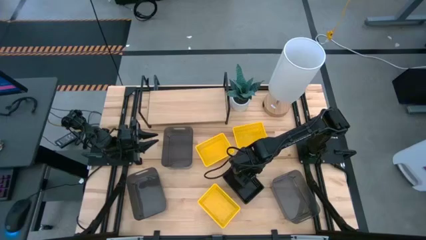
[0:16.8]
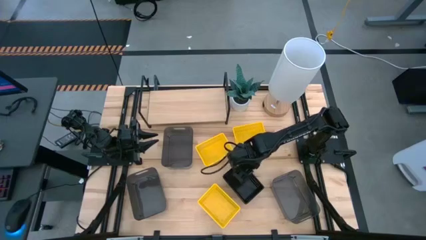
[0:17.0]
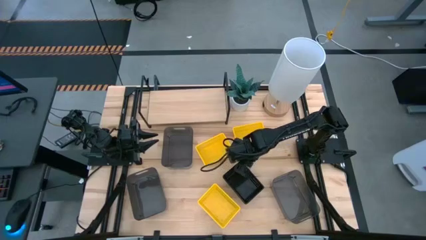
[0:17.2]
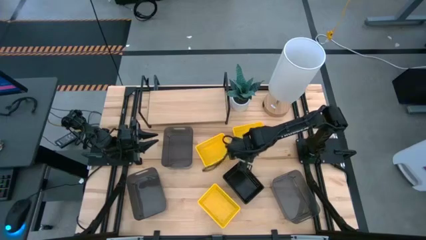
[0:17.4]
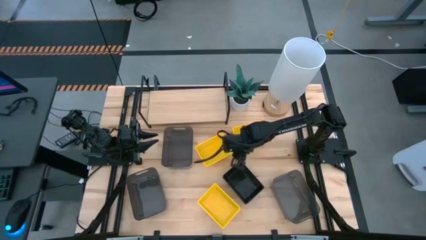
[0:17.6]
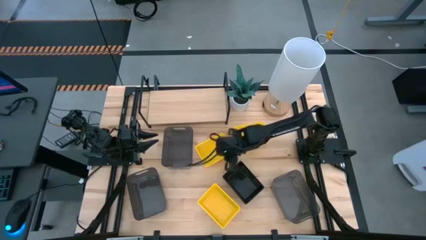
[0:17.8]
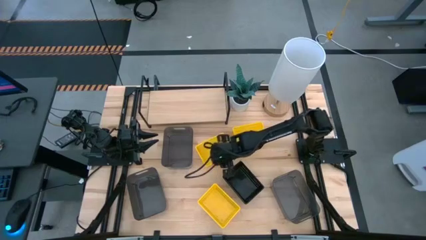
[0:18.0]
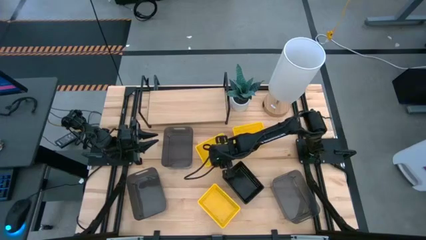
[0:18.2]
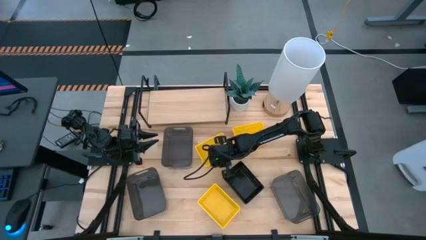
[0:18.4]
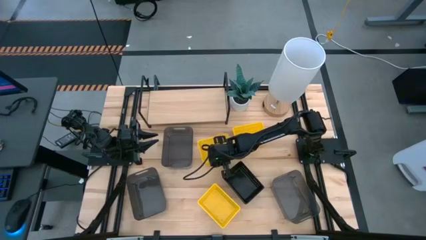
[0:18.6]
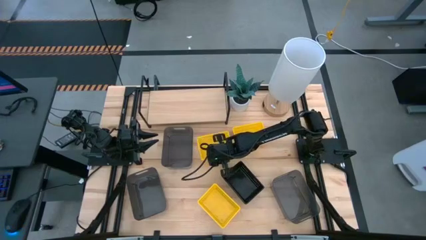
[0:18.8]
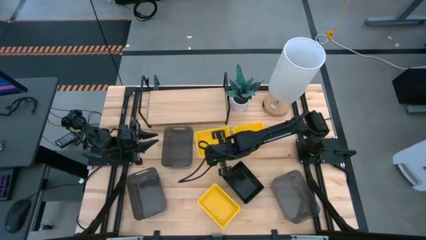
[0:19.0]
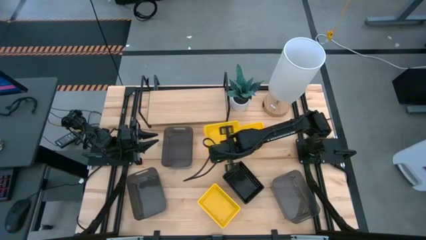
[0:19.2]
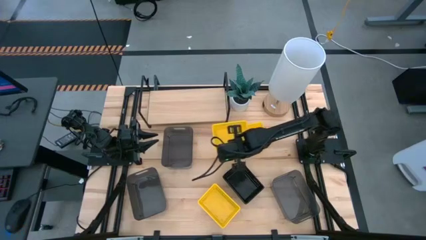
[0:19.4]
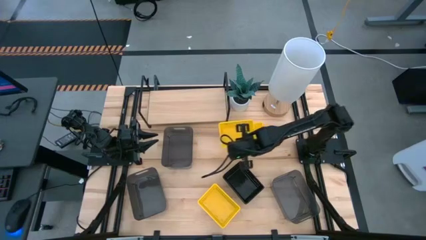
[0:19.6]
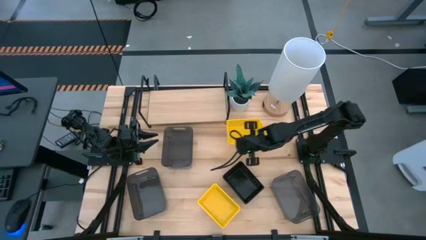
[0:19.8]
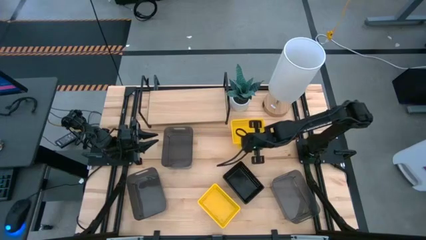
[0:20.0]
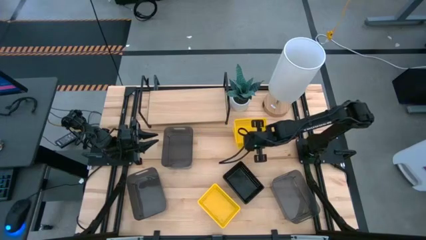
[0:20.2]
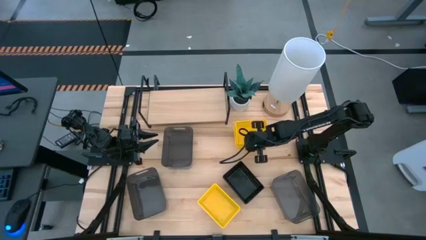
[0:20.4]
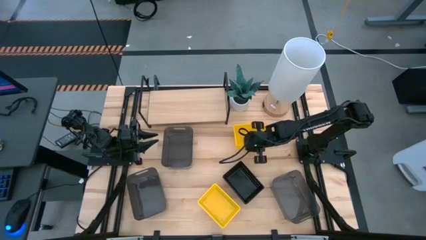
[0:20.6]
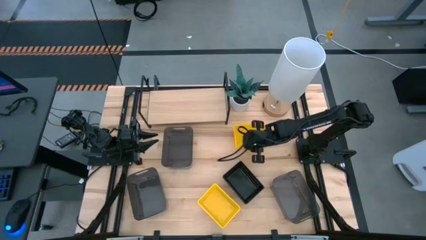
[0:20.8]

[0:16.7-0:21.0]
Task: Stack baskets on shelf by color
Stack the middle yellow basket on top of the top yellow basket

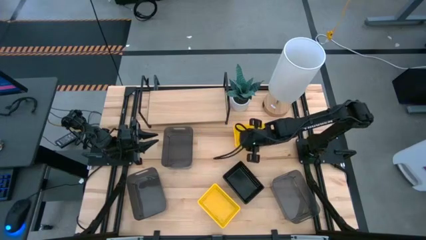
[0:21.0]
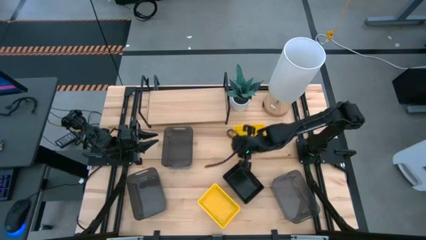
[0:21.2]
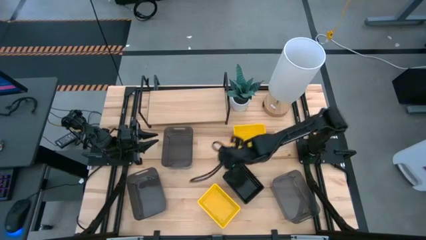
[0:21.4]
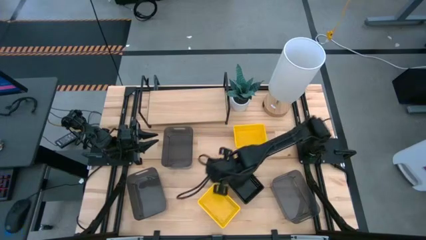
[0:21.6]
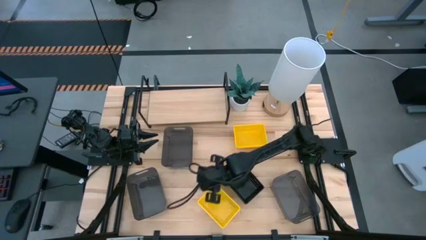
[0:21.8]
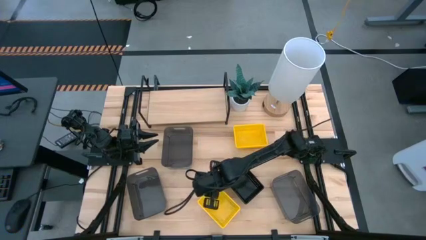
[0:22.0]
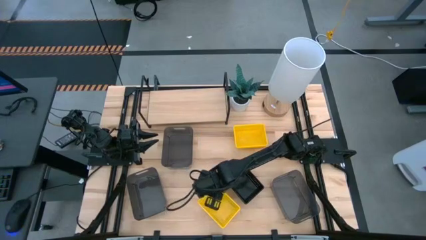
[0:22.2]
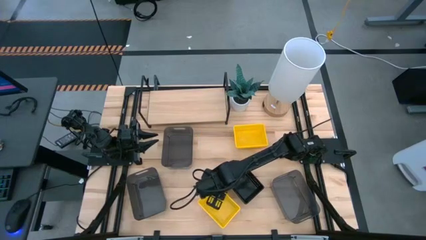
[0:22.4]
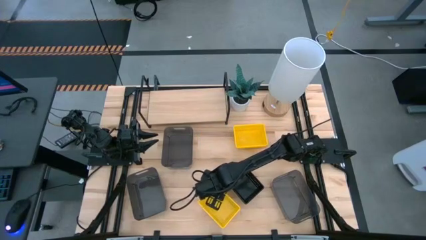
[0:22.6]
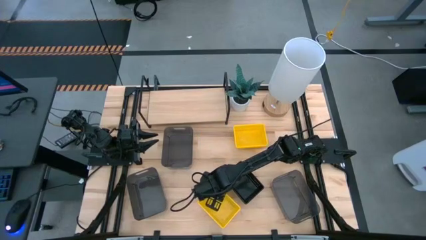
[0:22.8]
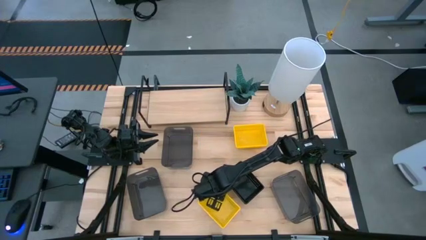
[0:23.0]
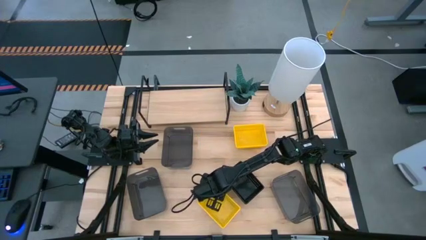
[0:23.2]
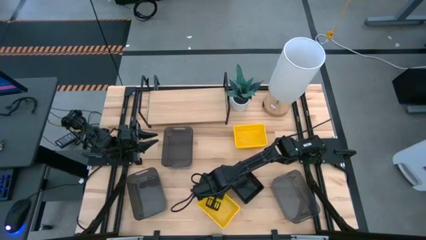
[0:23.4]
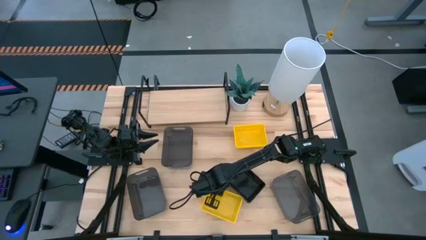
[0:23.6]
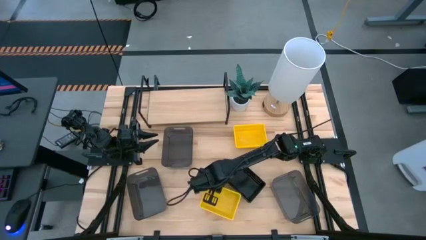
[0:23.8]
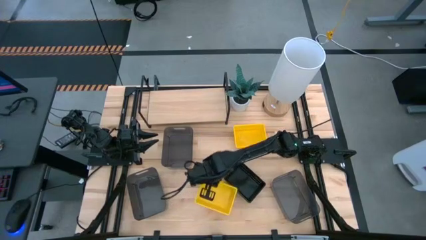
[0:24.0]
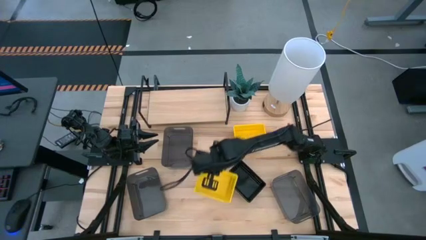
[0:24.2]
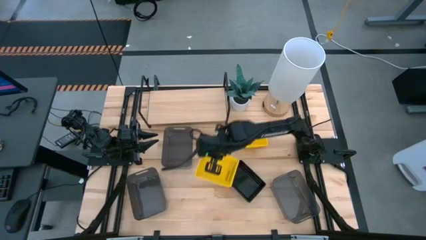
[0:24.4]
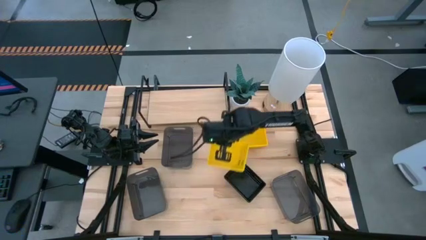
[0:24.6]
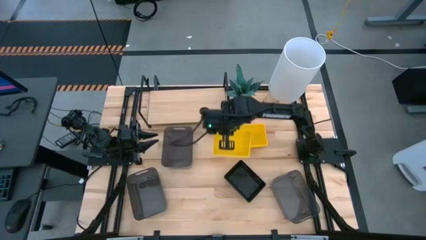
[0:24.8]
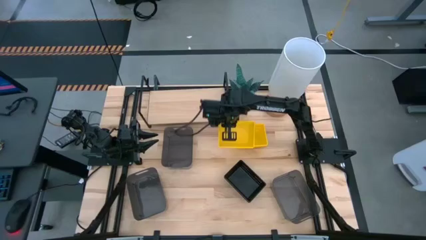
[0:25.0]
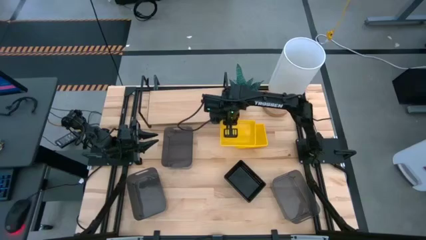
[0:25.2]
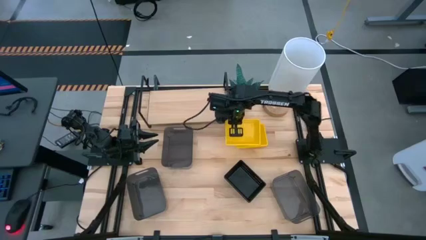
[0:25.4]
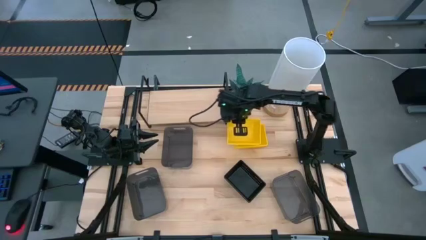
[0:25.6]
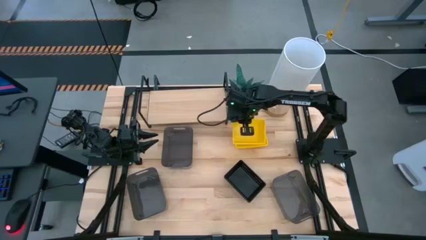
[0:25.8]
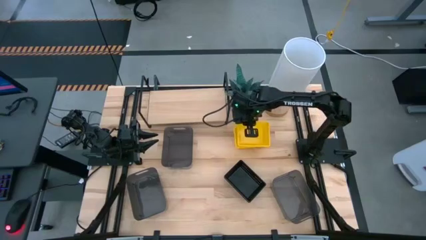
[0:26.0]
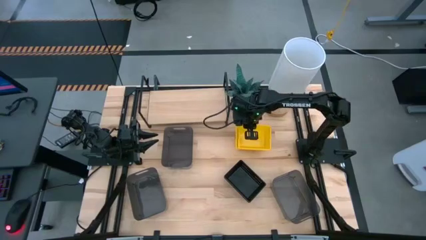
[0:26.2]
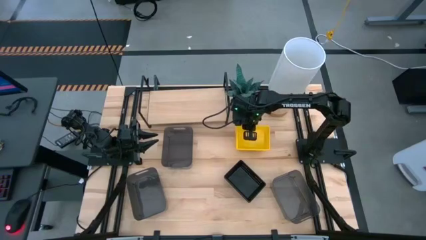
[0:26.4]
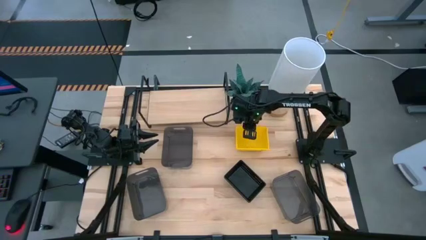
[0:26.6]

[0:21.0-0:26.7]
Stack the bottom yellow basket on top of the top yellow baskets

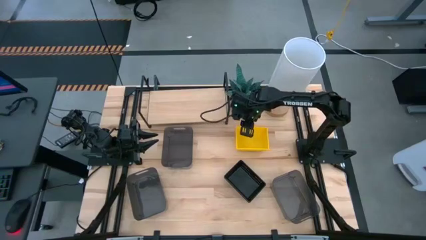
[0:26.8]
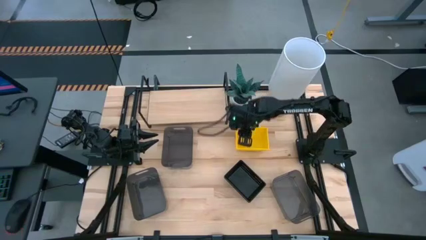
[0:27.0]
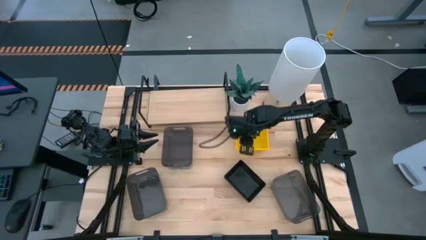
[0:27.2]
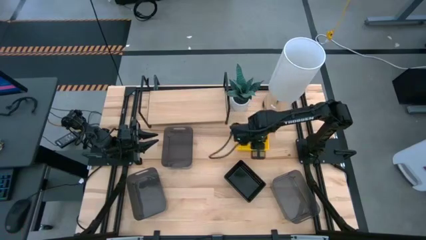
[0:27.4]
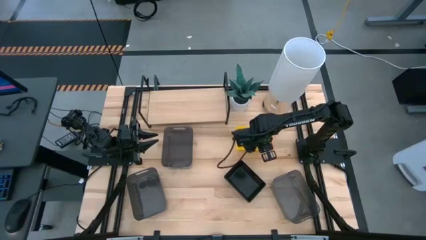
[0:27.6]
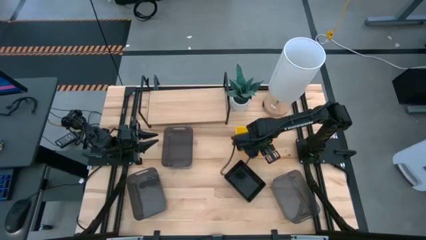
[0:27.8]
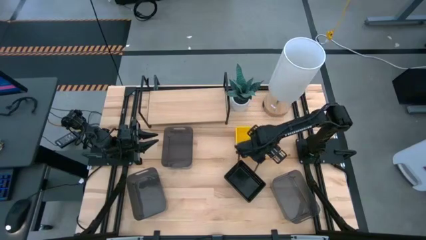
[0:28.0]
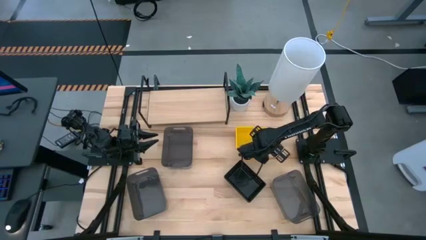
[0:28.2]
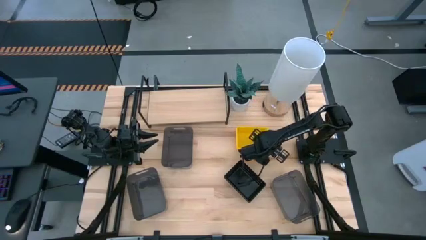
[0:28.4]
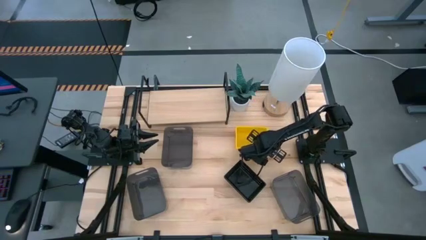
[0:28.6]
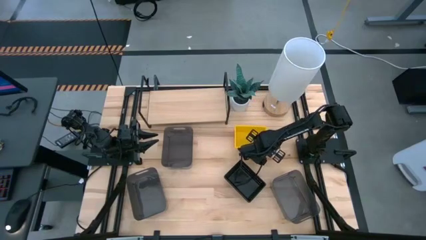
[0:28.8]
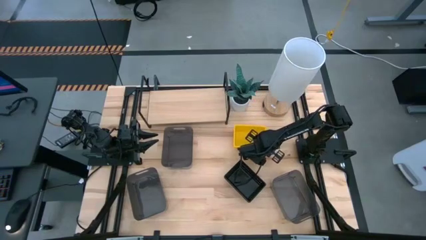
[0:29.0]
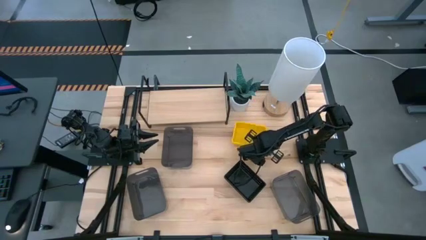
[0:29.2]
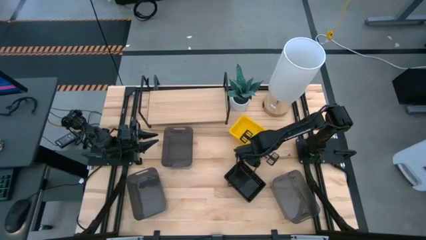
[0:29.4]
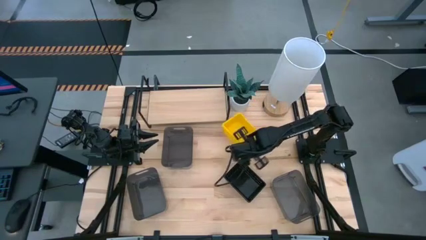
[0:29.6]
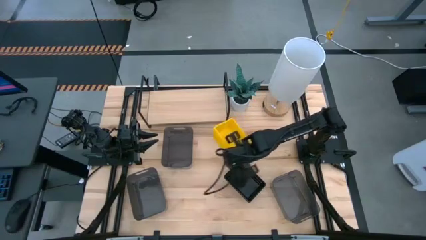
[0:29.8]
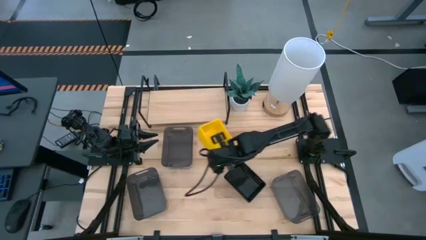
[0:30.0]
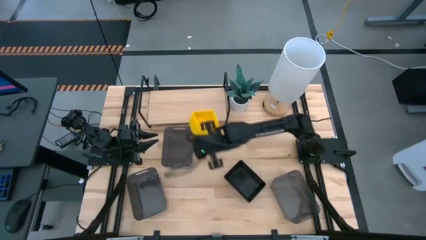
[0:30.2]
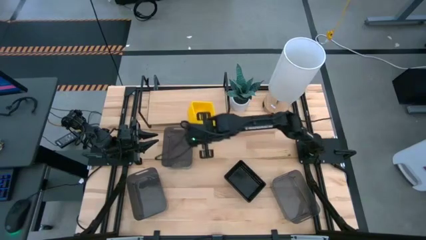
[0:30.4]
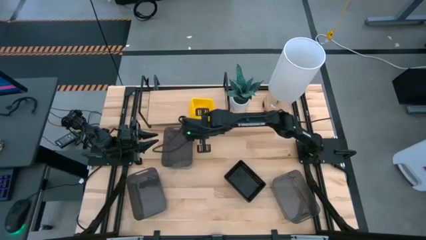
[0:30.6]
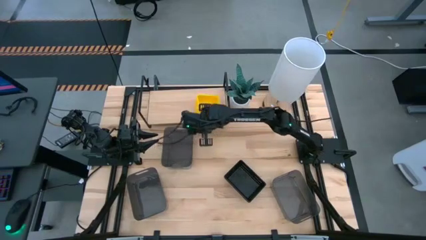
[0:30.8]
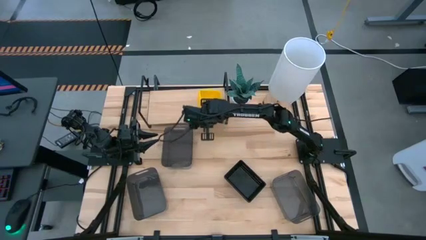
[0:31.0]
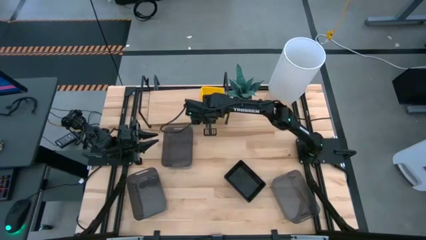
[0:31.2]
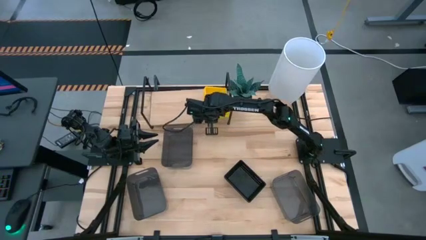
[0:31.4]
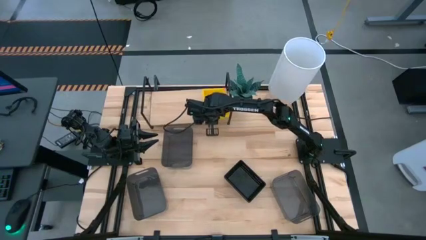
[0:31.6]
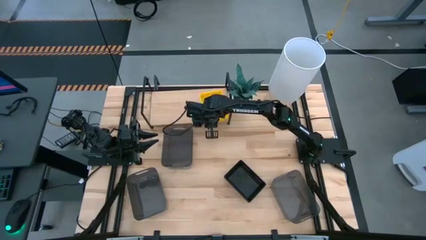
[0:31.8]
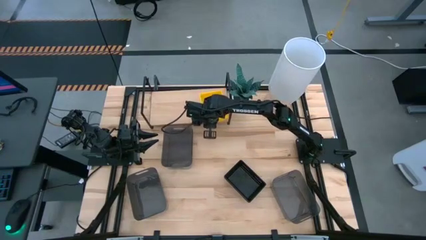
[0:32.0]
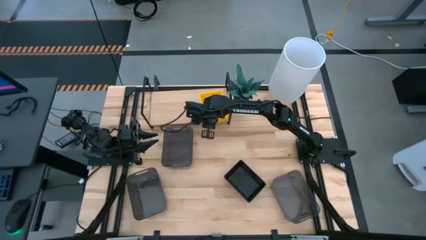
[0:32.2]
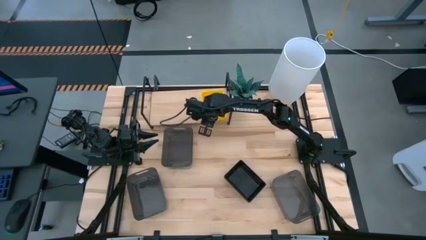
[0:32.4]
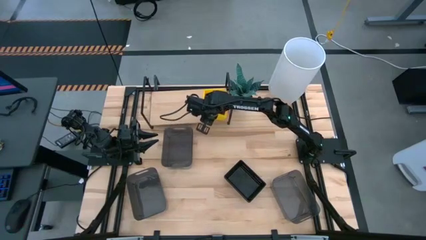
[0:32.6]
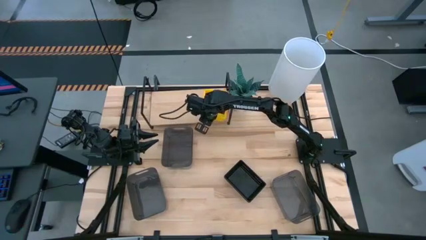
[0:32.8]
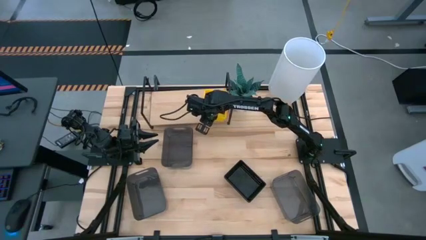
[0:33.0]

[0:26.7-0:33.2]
Put the stacked yellow baskets on the shelf
